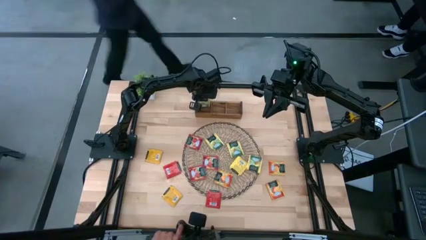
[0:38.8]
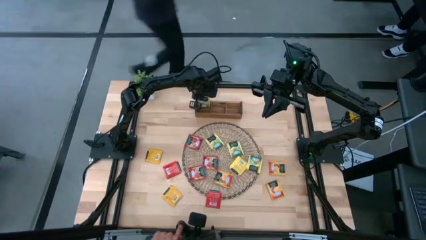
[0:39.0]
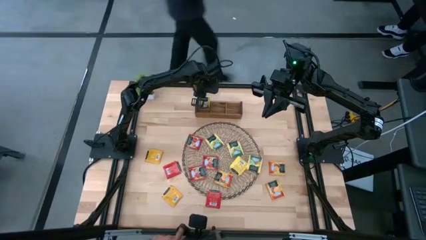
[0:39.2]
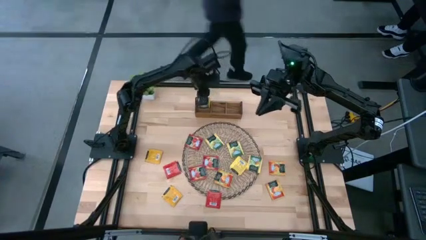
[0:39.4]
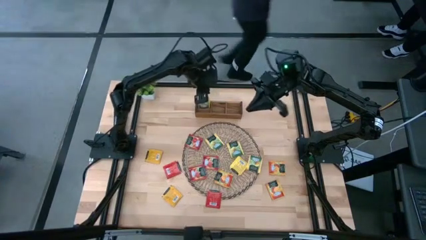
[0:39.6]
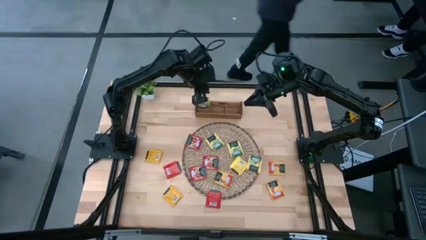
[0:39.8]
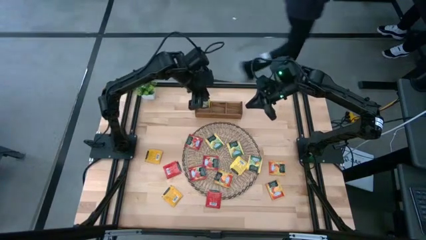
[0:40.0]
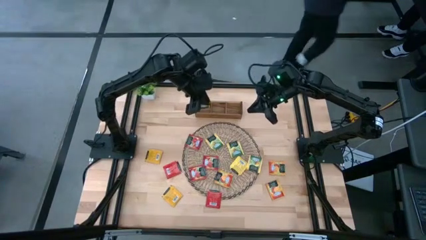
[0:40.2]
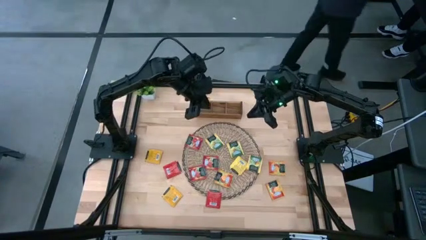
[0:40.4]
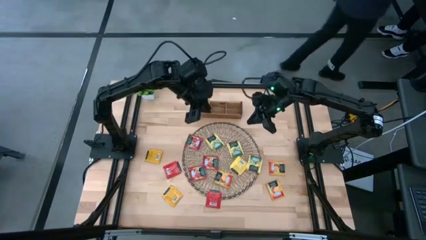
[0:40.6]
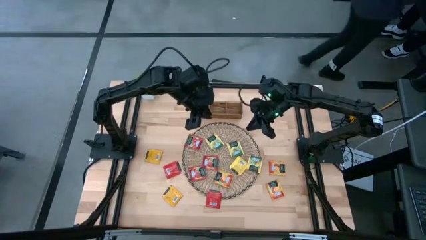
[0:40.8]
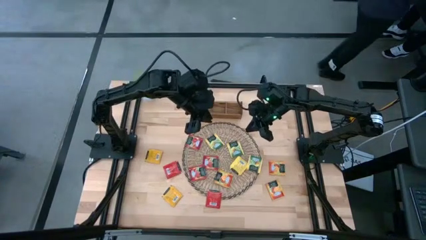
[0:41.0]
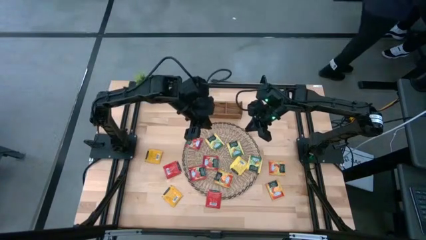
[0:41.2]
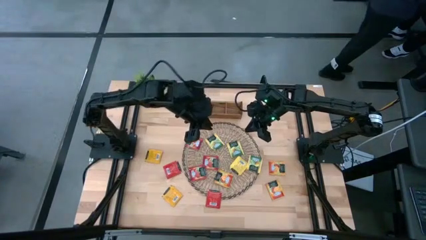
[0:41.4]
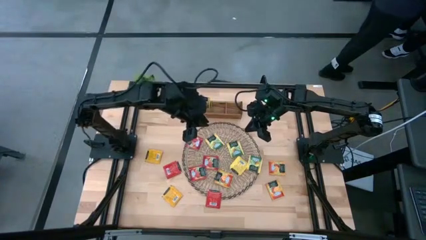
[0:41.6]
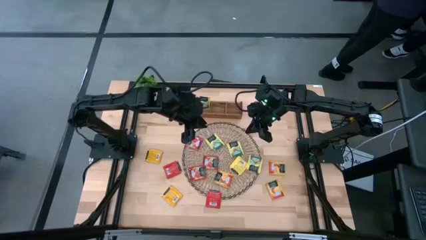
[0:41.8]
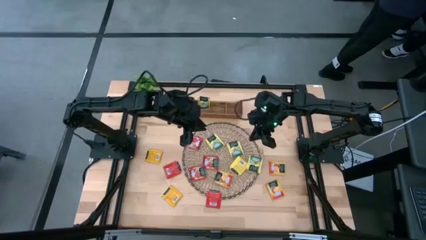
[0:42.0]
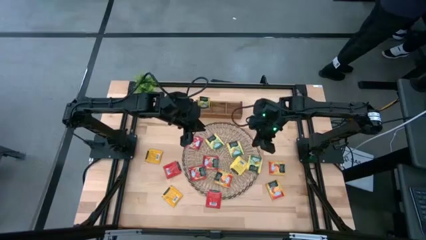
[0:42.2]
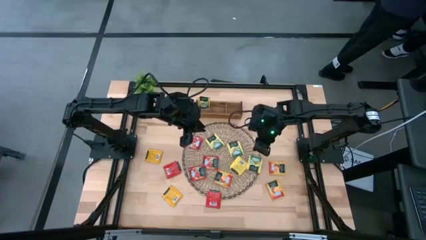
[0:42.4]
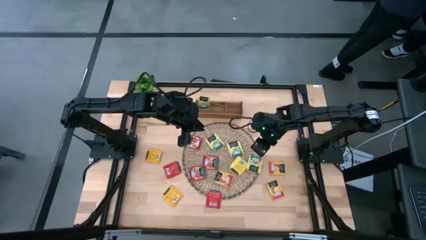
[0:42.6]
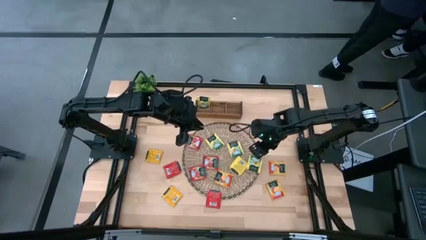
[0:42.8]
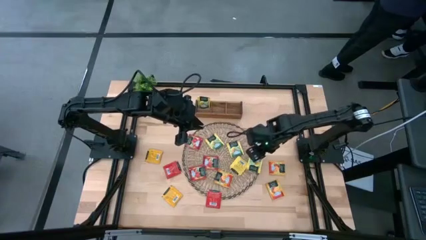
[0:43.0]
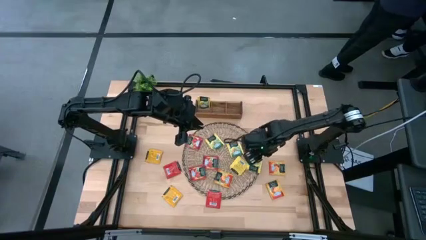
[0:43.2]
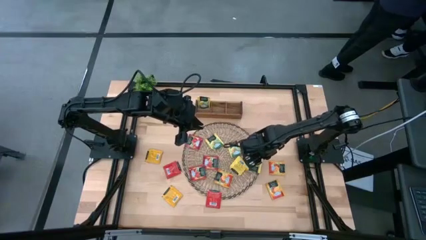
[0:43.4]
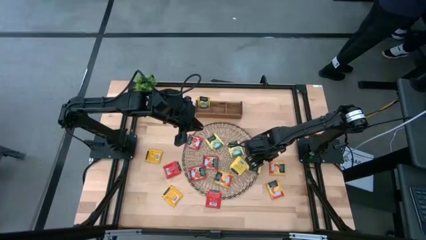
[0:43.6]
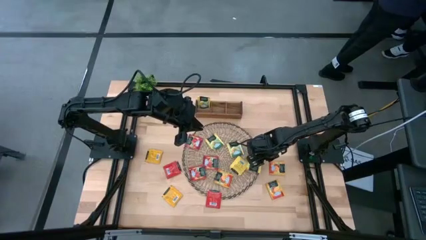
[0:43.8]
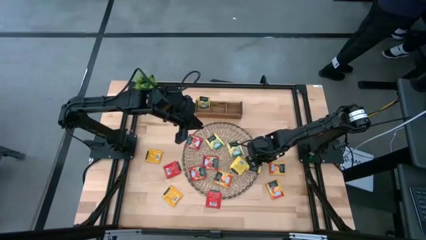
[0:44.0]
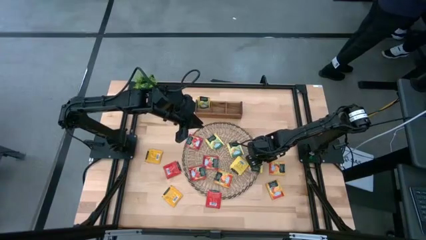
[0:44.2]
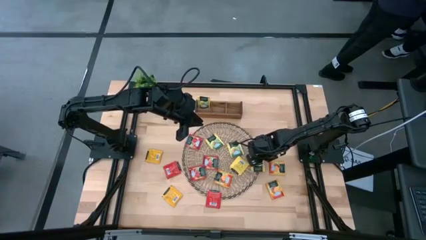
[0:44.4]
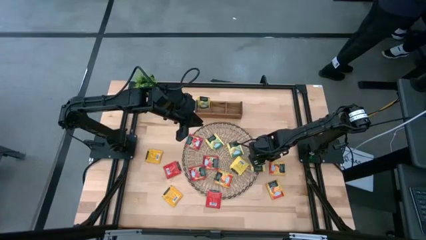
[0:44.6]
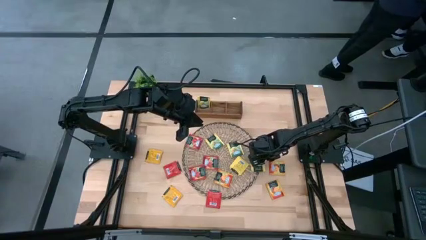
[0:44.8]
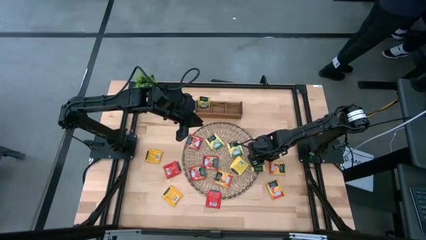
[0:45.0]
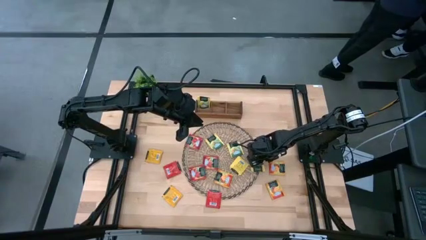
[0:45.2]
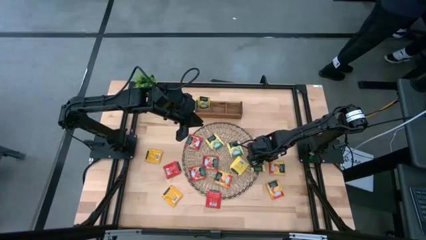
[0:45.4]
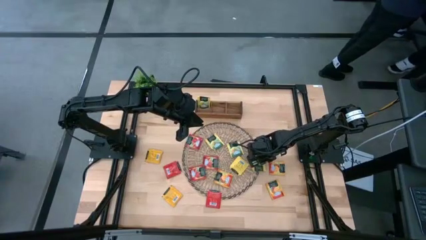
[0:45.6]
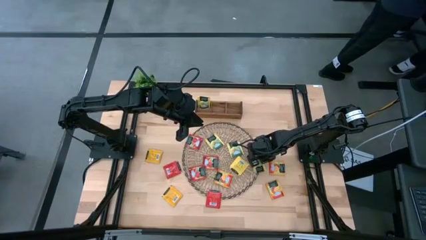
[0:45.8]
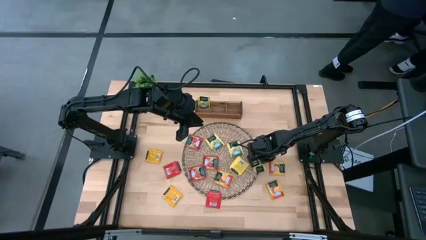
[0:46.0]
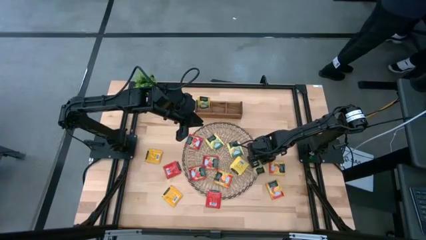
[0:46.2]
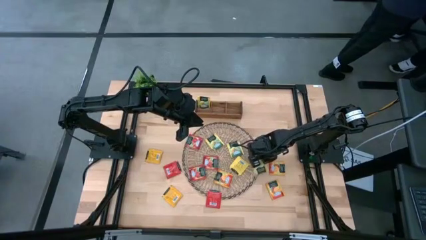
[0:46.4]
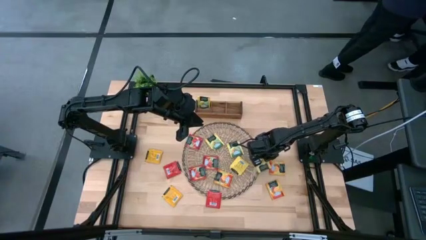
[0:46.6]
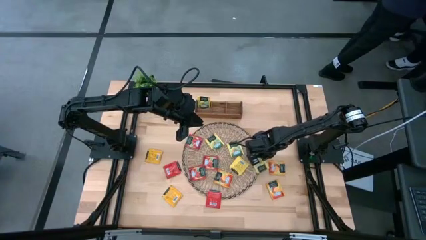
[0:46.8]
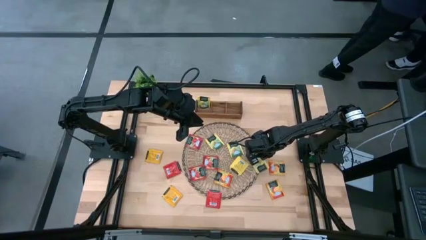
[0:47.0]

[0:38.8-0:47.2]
Task: Pick & Place Tea
Put the yellow tea bag into the left of the wooden organizer
